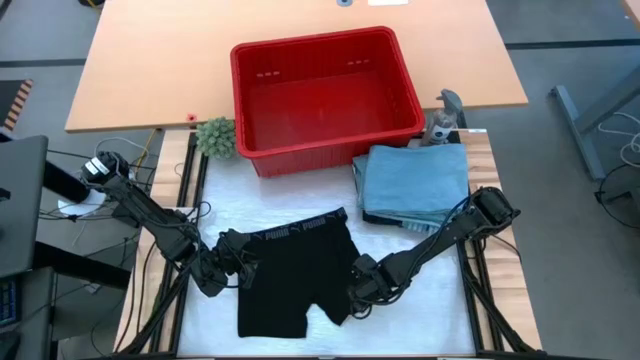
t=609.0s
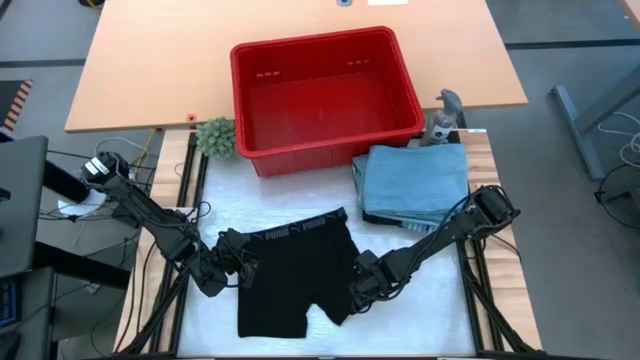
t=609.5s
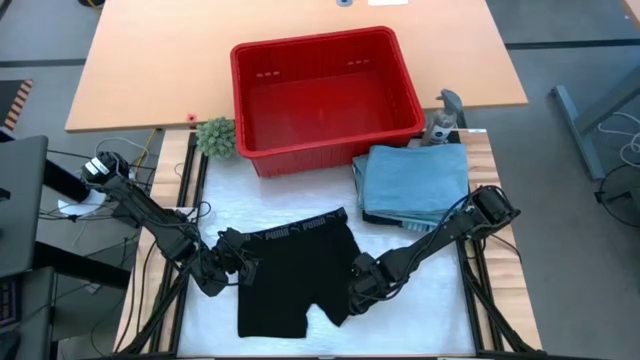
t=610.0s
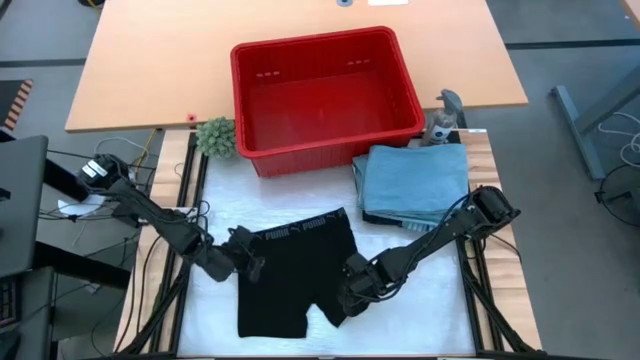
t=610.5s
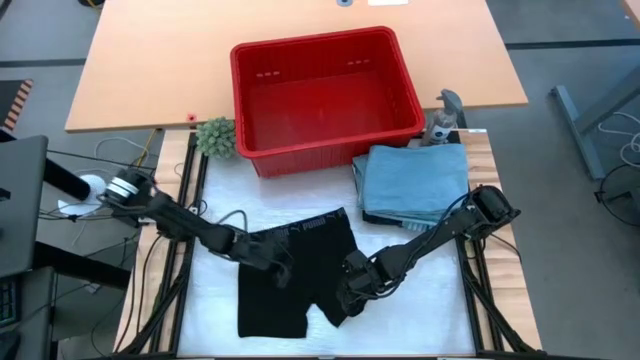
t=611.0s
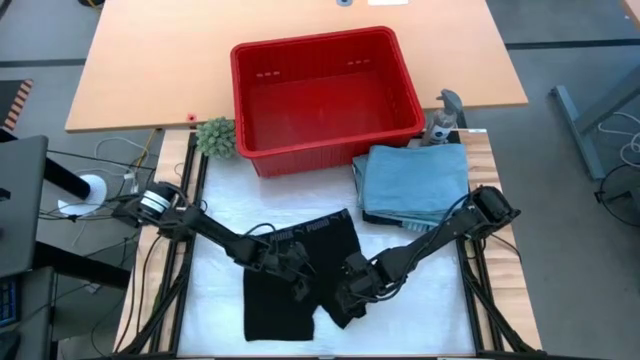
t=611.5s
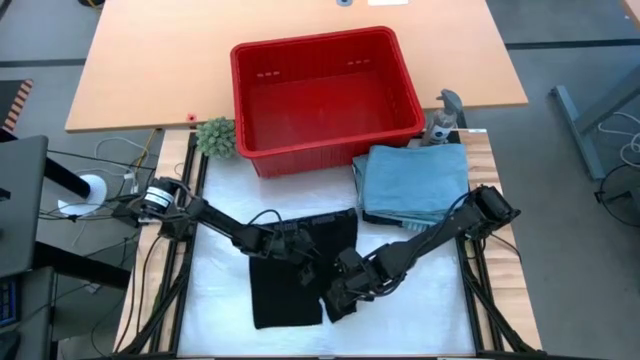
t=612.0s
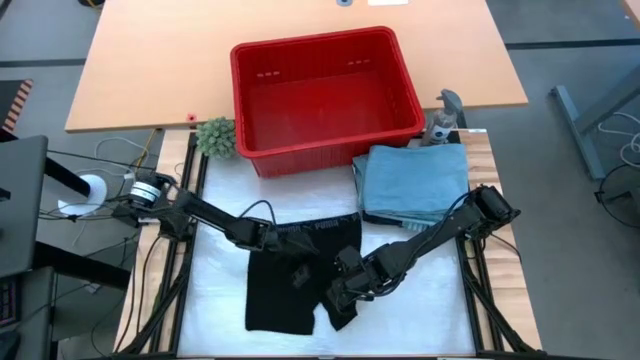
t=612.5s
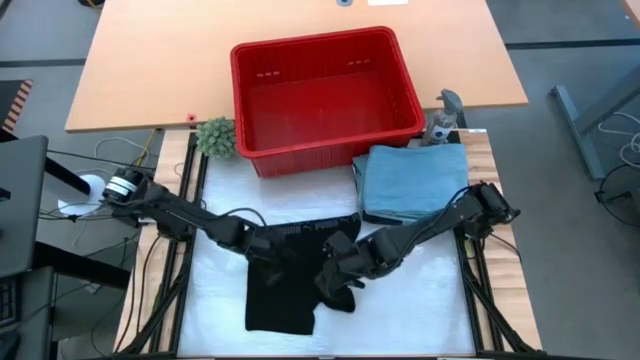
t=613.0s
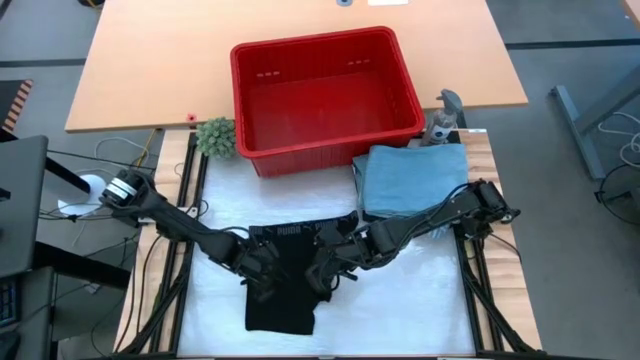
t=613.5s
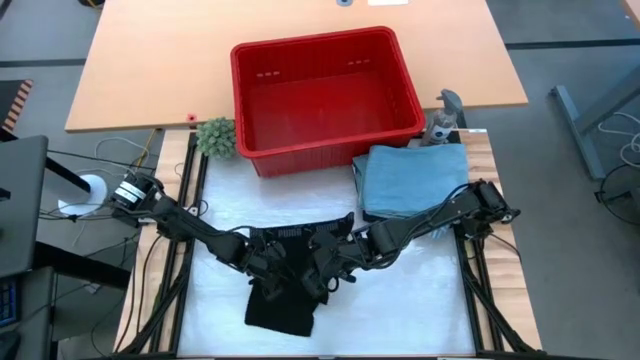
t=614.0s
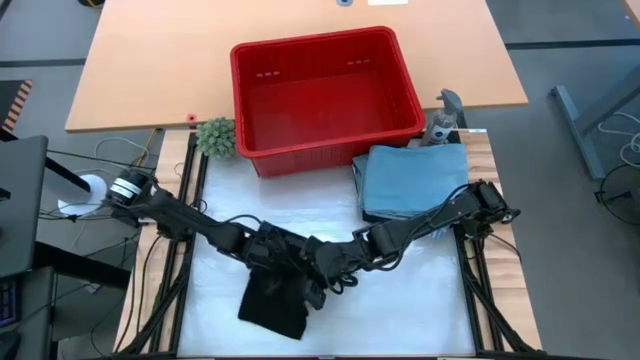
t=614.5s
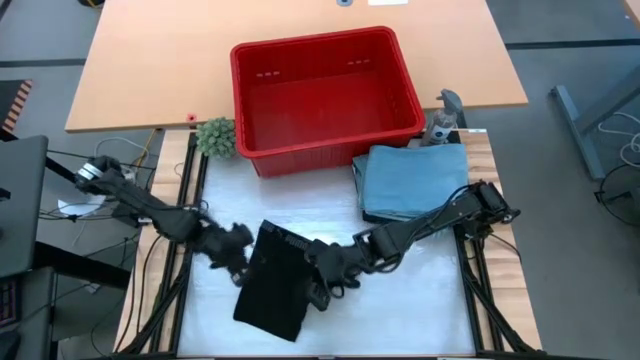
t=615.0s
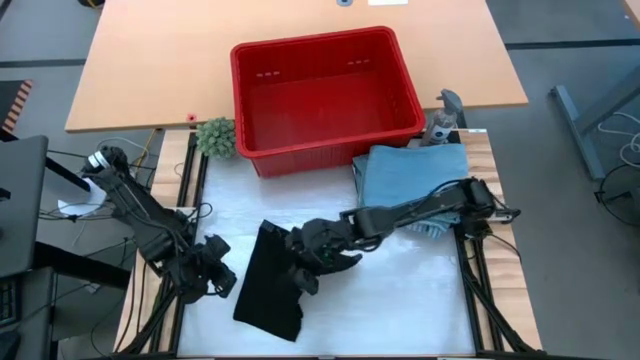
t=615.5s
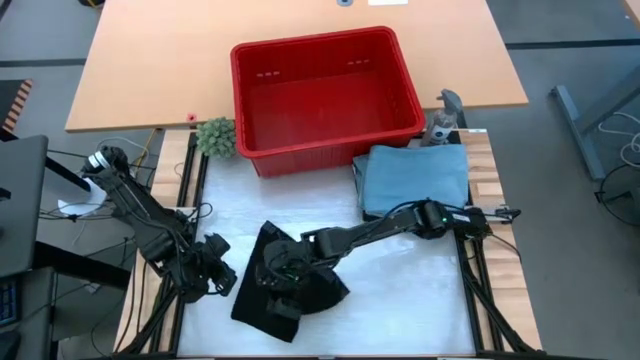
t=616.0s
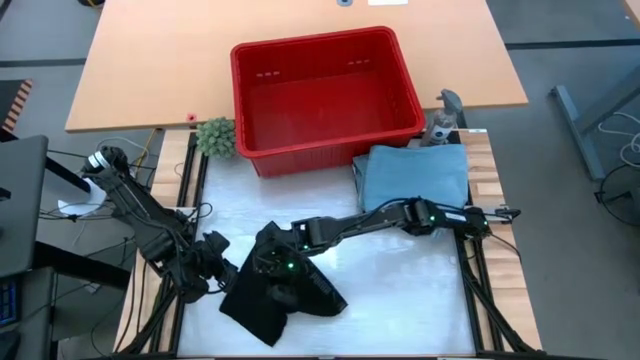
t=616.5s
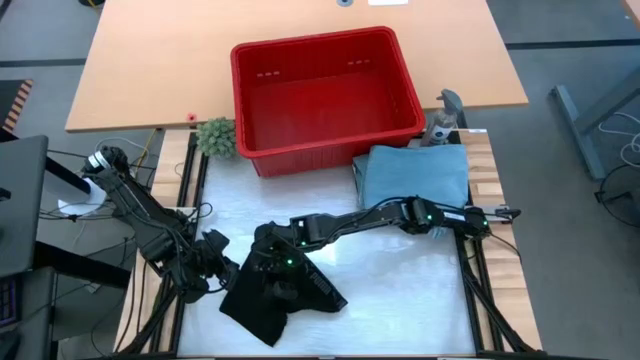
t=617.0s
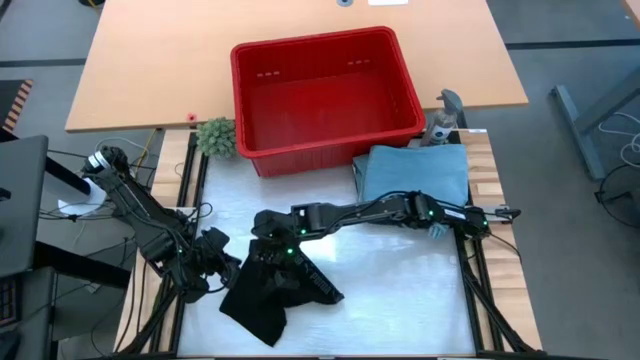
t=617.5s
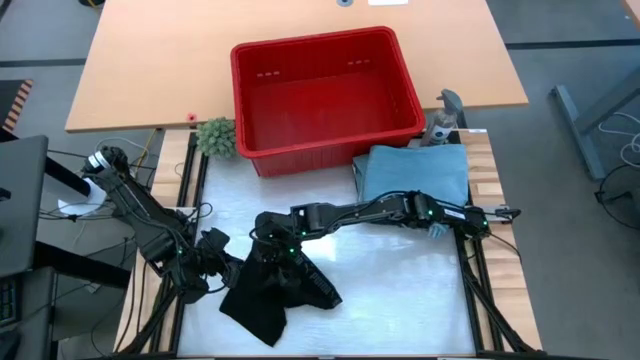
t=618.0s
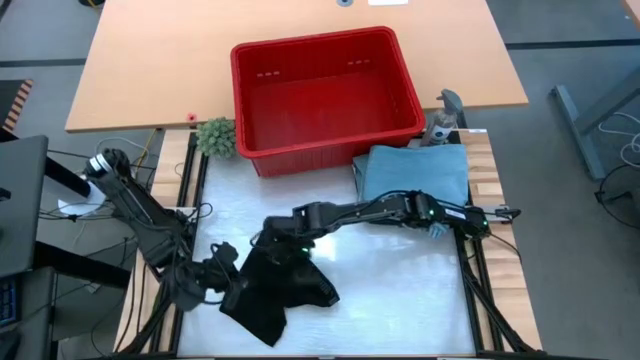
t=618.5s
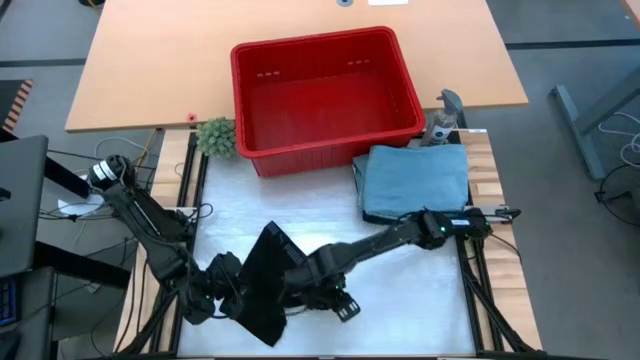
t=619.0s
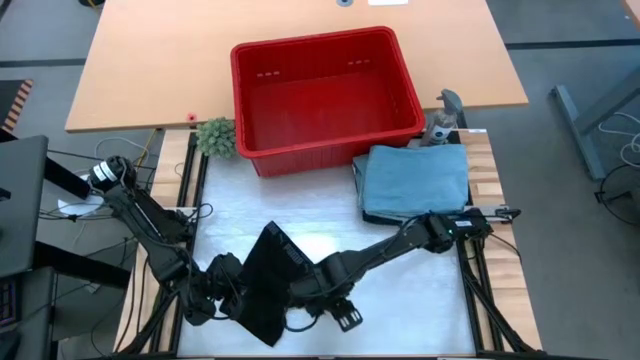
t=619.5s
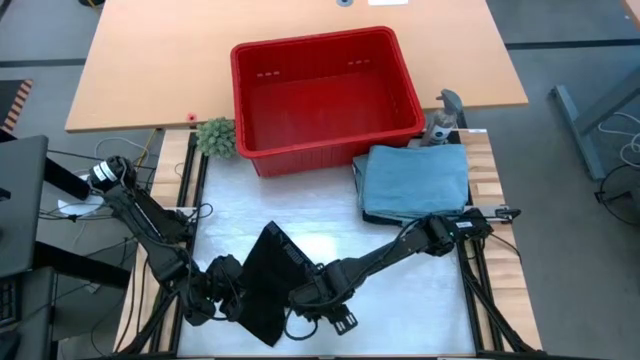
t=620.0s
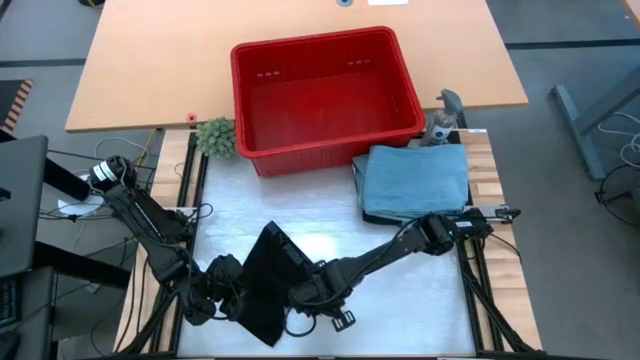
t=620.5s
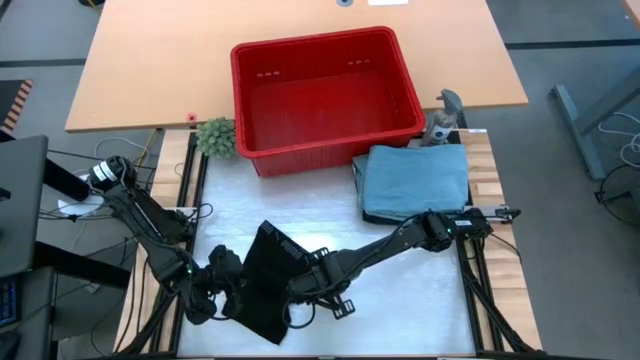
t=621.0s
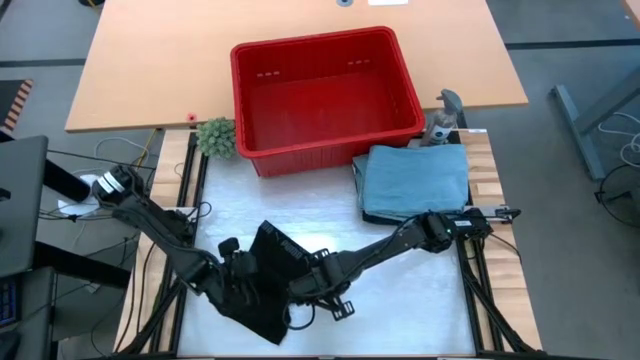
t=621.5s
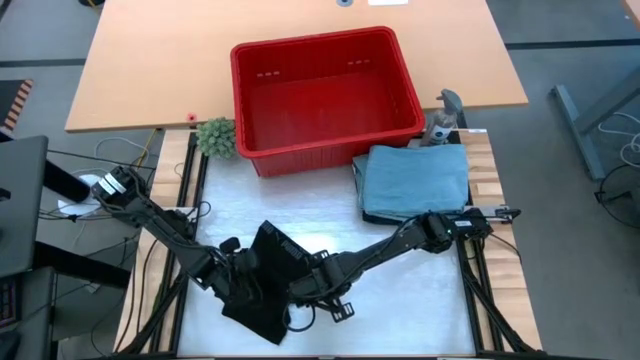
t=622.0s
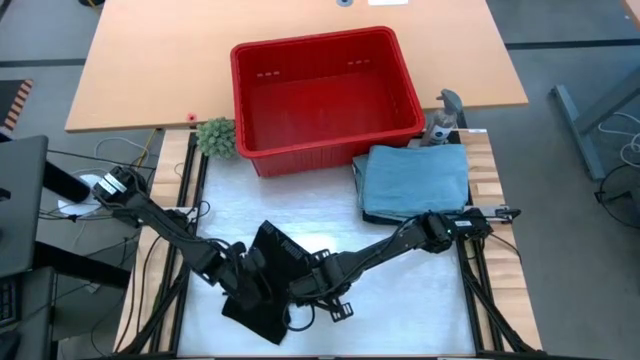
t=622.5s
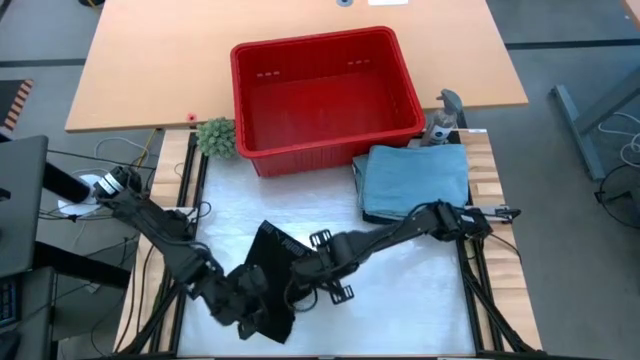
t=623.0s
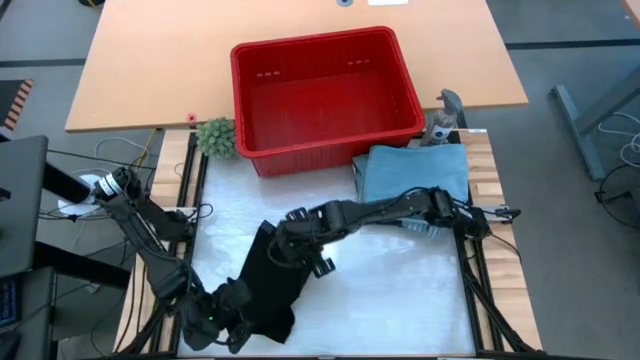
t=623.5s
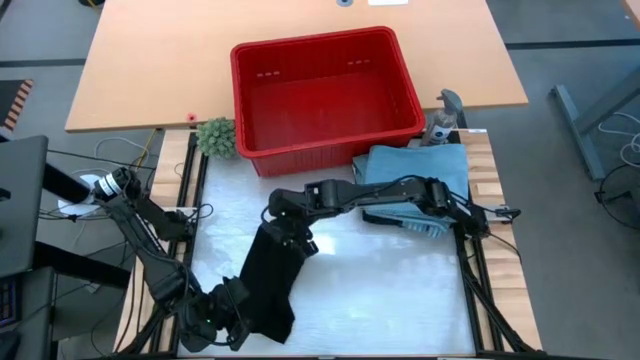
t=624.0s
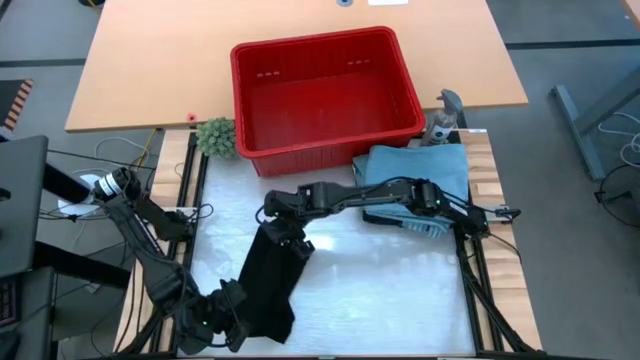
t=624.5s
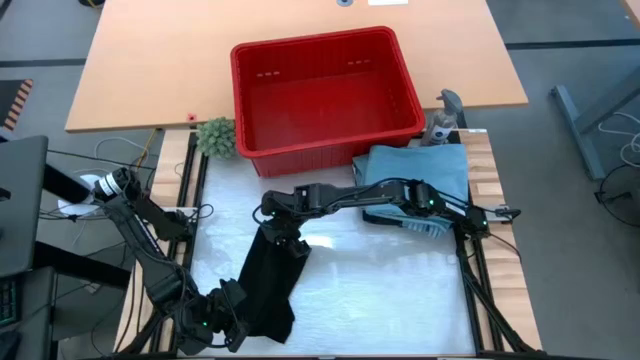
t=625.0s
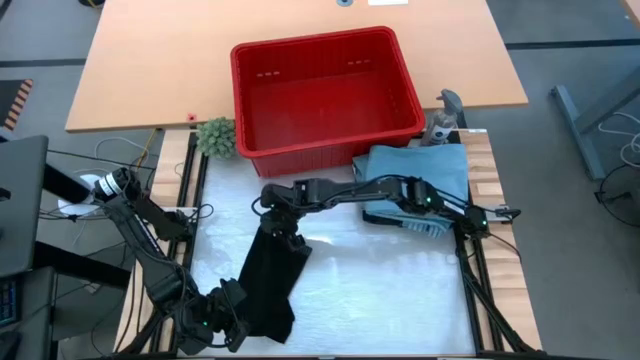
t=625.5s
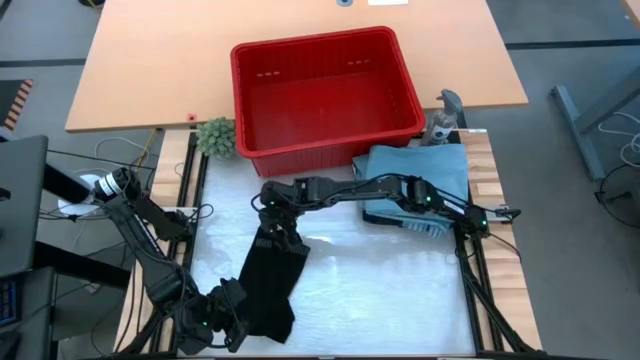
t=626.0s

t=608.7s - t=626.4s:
Task: Fold Laundry from Bin
Fold the black boxer short
